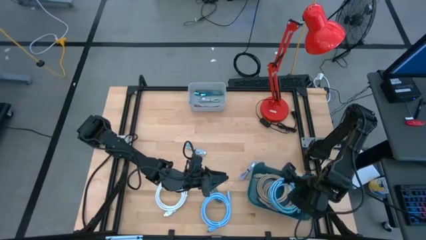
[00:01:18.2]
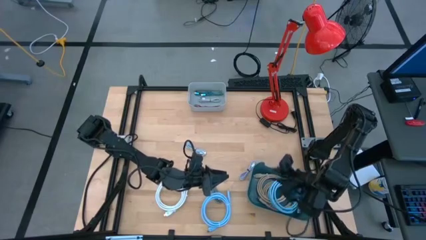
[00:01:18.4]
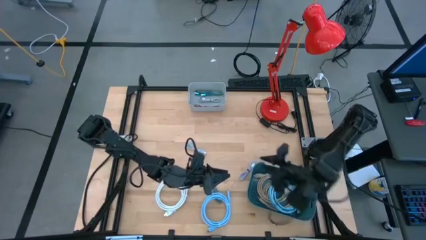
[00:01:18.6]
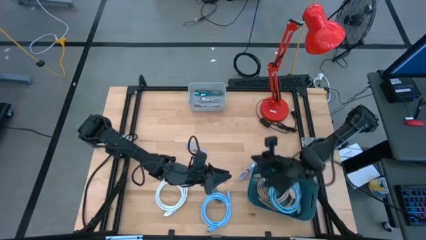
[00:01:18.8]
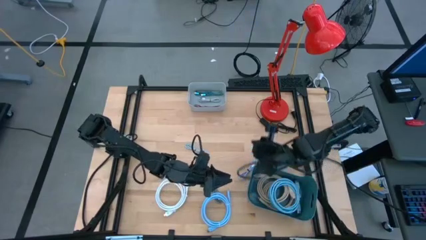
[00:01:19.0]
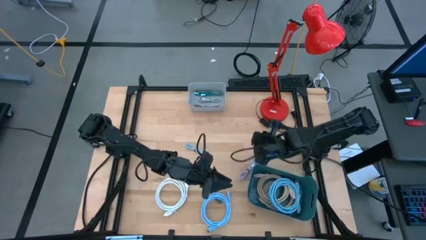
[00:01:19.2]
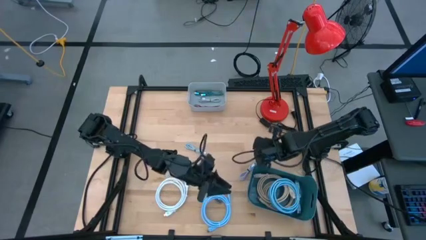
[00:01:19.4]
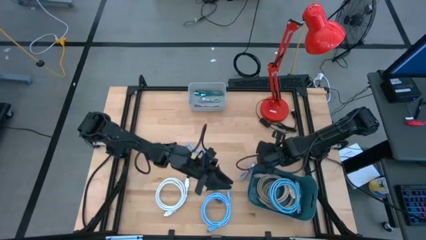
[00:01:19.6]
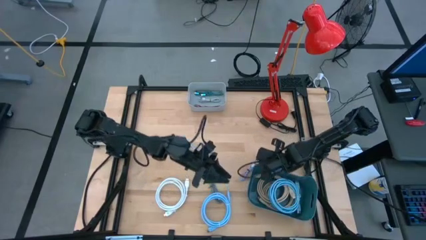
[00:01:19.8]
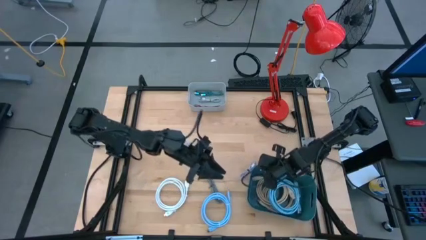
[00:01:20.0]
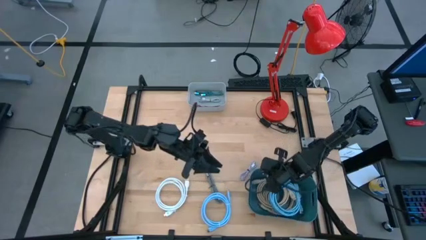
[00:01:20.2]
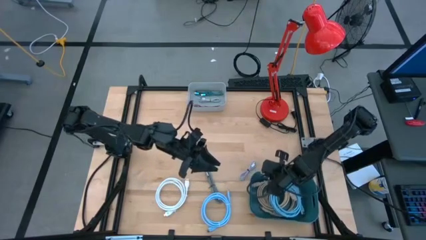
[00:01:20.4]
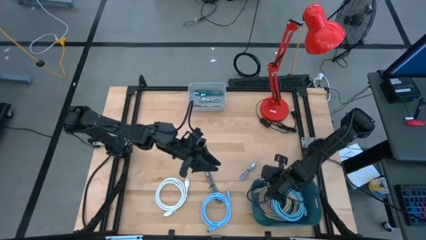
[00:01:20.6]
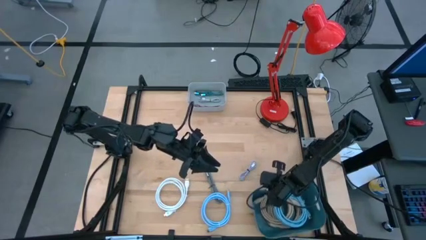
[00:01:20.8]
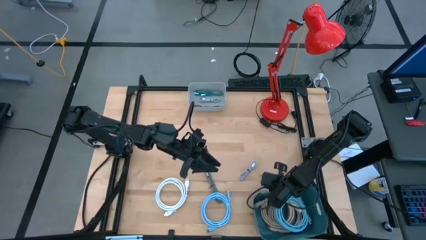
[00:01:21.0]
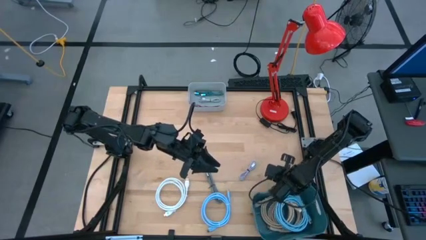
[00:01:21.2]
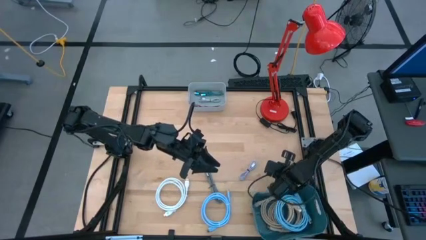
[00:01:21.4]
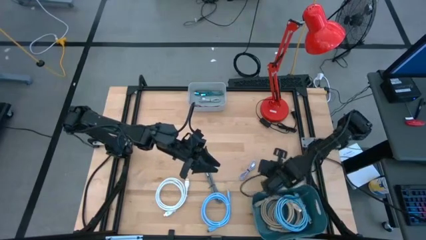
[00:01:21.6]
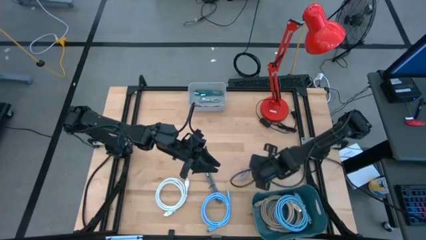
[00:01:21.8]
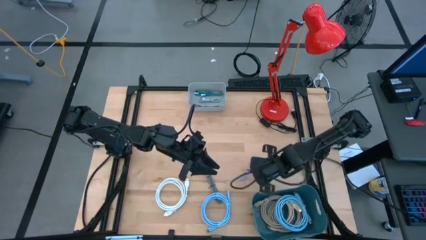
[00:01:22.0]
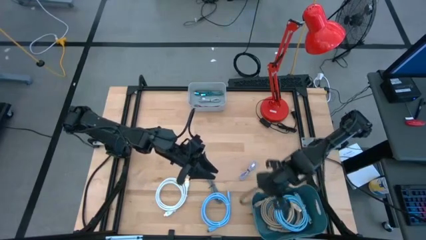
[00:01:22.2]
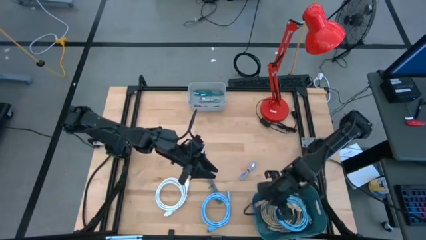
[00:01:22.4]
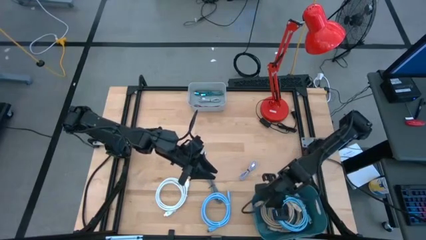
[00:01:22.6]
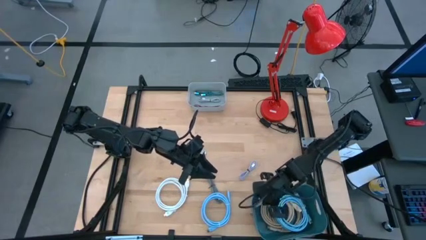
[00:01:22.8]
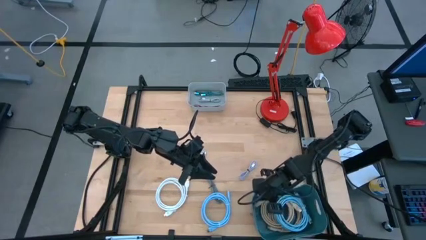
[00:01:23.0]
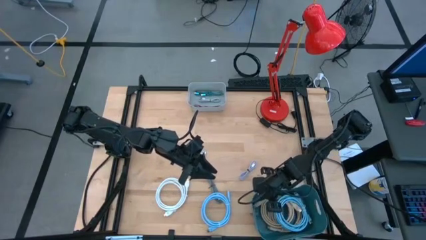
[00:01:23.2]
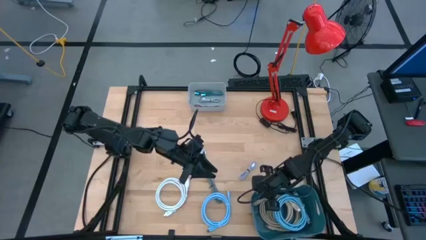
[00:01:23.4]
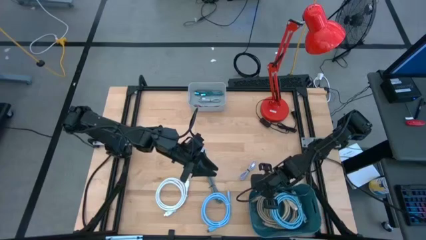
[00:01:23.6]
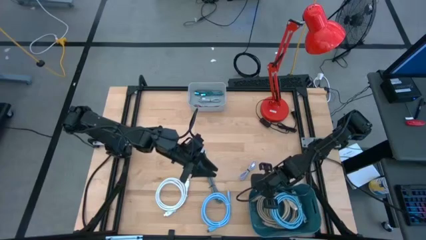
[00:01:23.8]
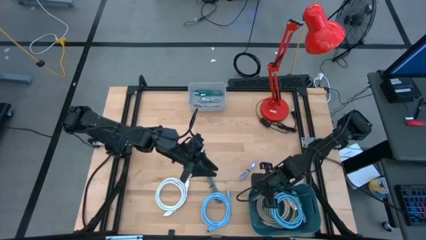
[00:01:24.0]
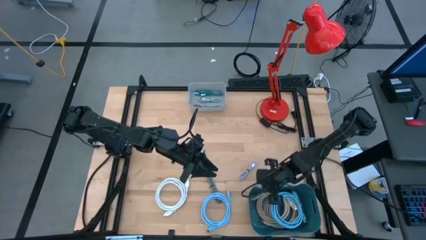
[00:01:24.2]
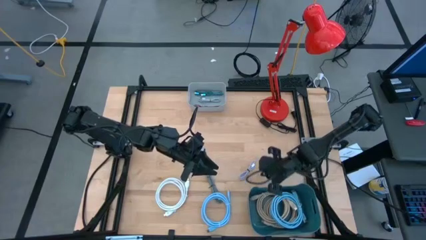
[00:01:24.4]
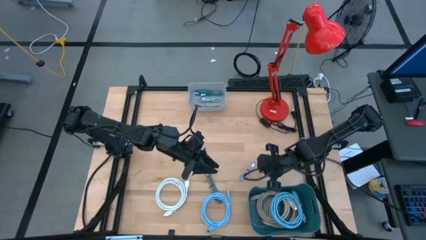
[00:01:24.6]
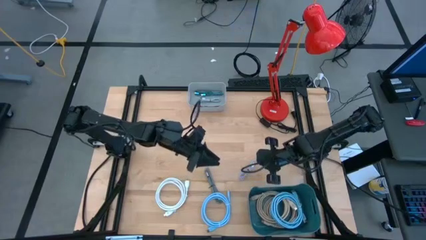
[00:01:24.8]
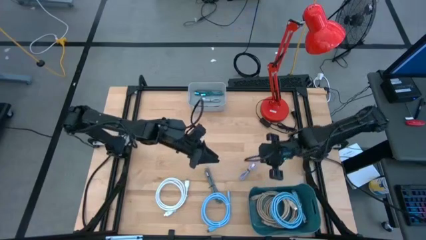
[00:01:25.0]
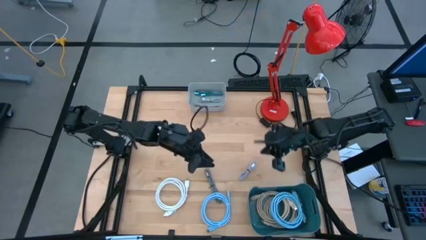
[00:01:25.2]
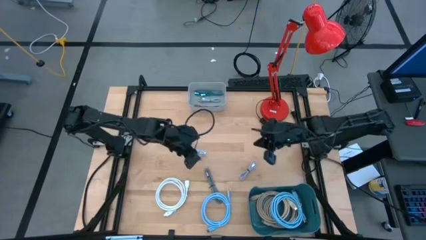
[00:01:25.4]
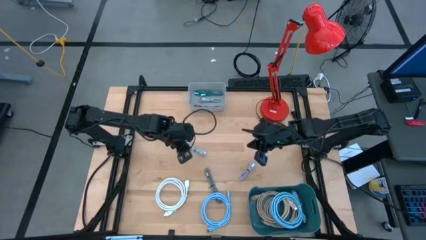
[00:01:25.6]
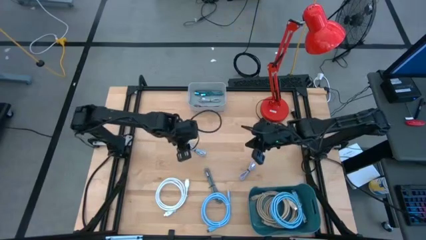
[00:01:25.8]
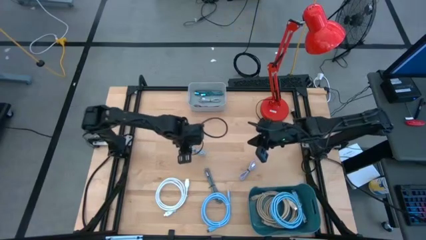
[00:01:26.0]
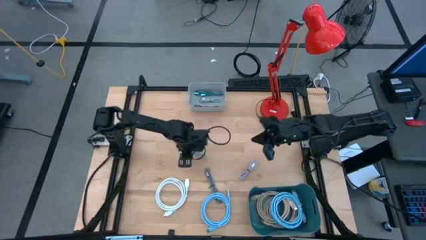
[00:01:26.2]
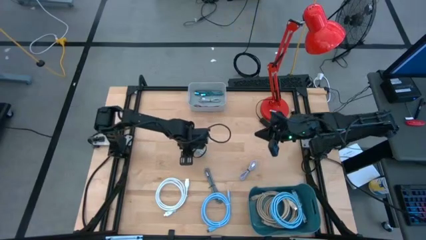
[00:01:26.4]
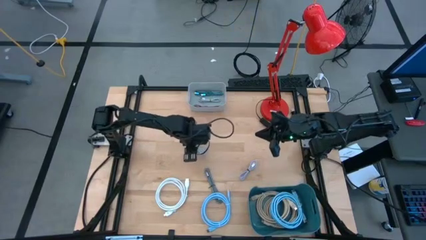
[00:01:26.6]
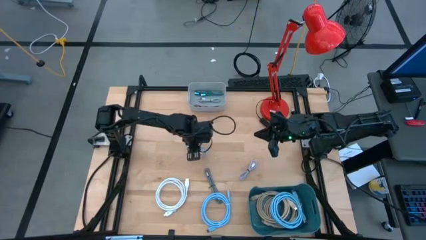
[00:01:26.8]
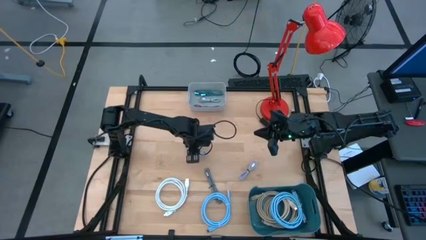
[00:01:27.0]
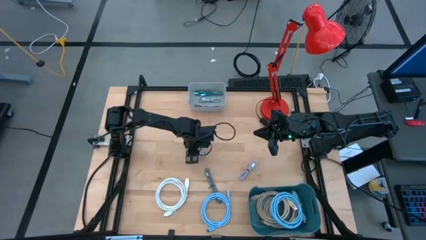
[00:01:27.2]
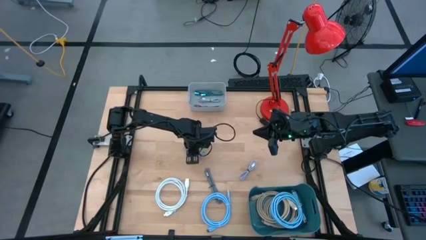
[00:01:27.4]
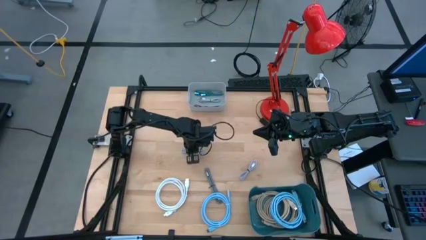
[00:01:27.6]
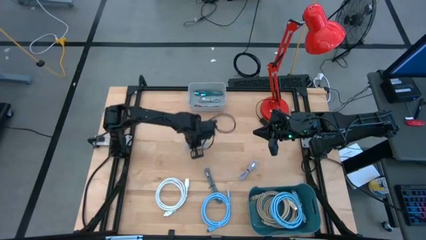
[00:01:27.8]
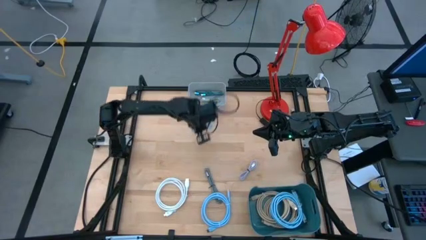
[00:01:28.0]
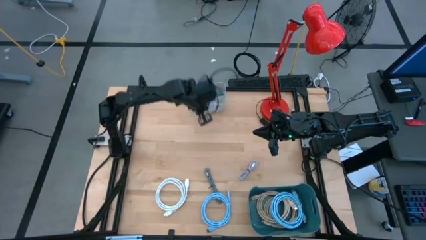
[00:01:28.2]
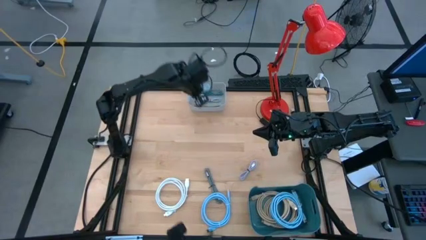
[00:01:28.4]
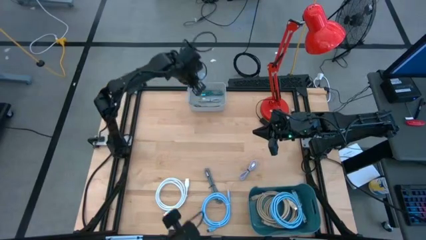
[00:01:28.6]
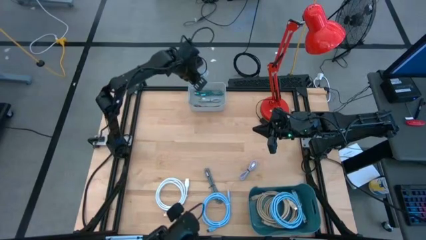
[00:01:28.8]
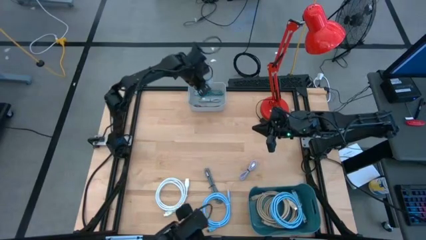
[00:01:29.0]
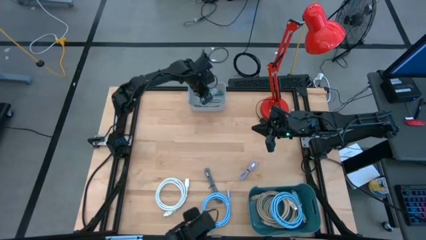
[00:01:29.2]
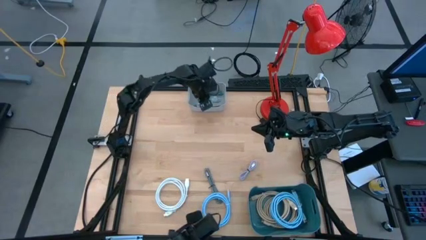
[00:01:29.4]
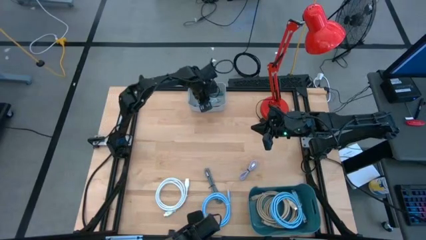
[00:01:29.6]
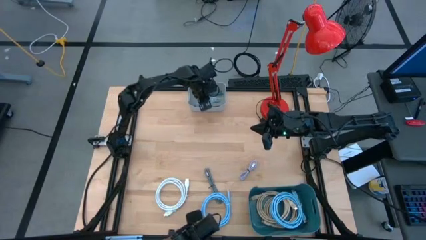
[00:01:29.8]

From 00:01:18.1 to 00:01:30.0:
Task: Pick & Place USB Port
Put the light blue usb cable into the gray bin

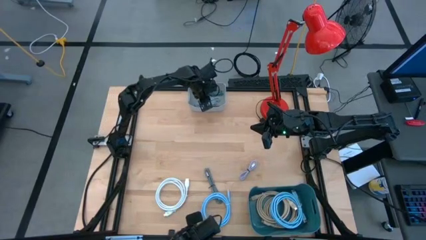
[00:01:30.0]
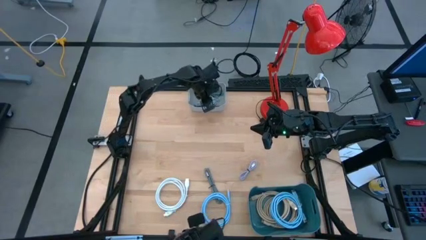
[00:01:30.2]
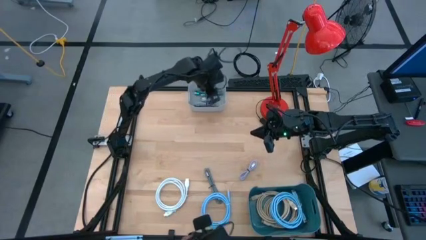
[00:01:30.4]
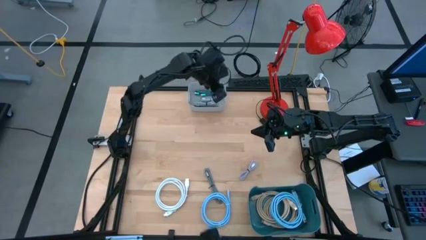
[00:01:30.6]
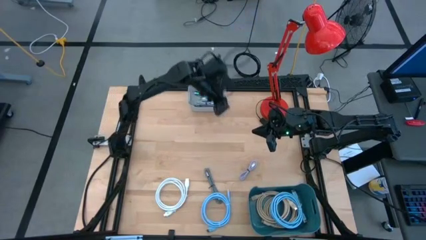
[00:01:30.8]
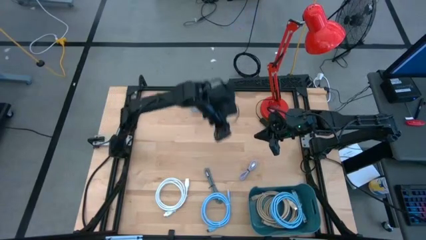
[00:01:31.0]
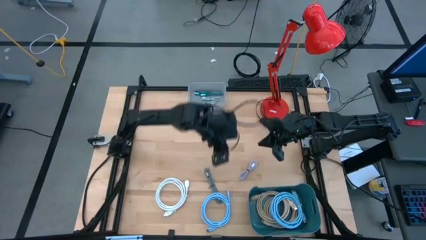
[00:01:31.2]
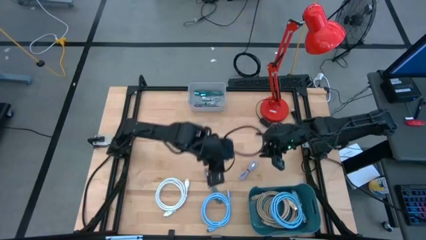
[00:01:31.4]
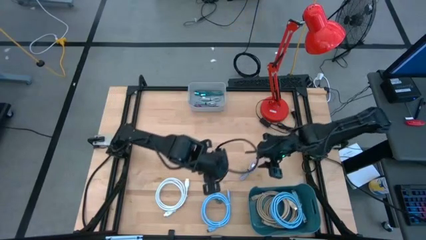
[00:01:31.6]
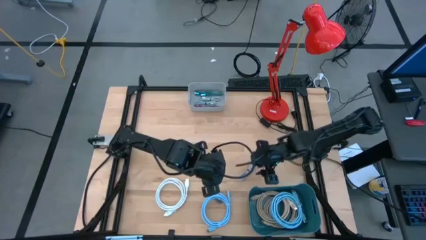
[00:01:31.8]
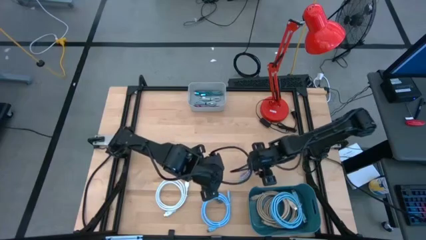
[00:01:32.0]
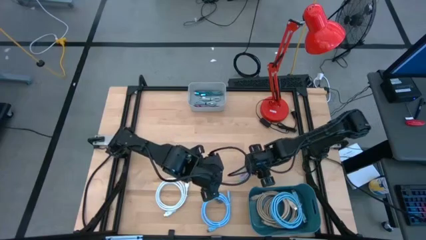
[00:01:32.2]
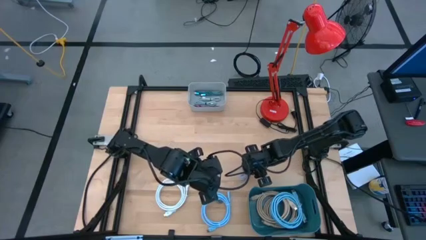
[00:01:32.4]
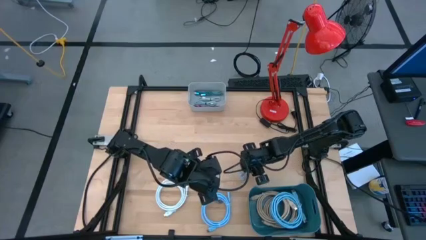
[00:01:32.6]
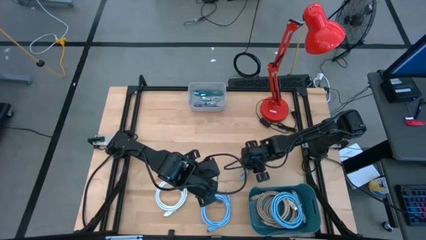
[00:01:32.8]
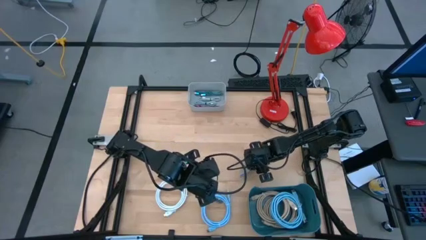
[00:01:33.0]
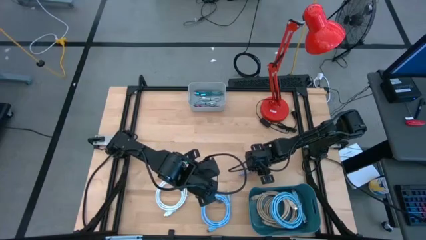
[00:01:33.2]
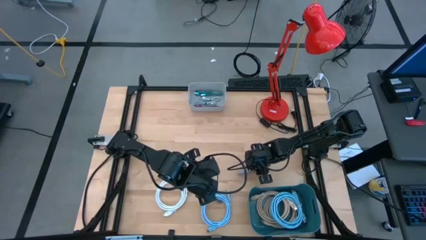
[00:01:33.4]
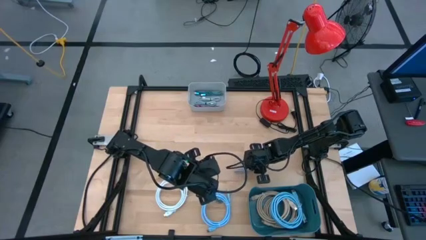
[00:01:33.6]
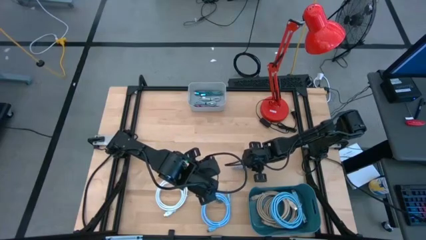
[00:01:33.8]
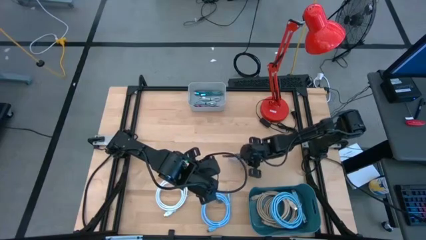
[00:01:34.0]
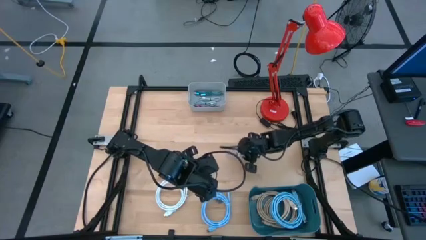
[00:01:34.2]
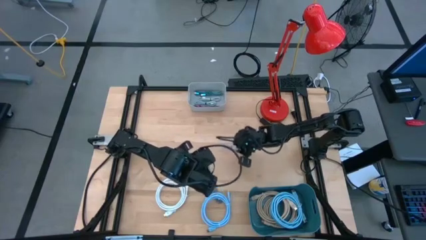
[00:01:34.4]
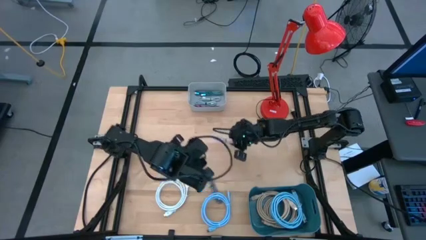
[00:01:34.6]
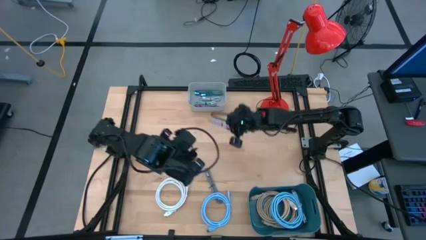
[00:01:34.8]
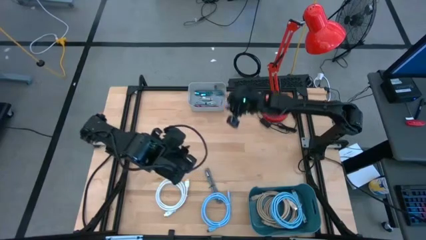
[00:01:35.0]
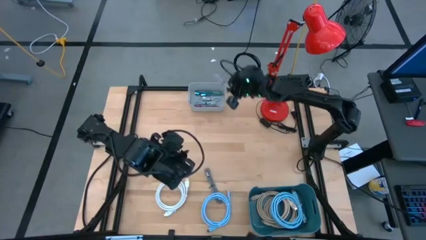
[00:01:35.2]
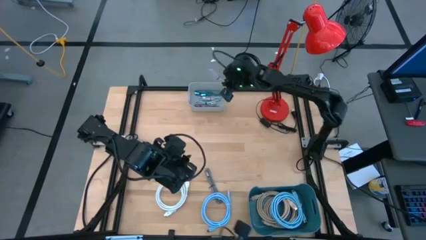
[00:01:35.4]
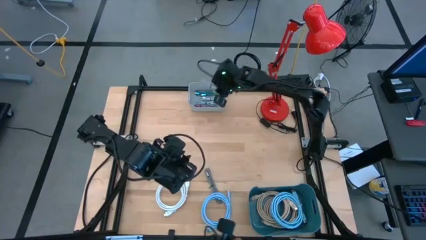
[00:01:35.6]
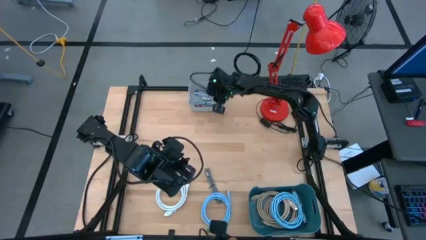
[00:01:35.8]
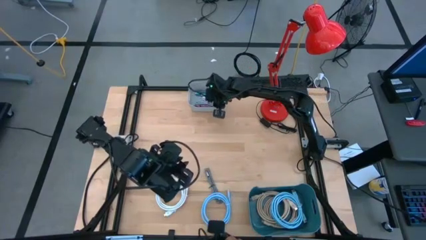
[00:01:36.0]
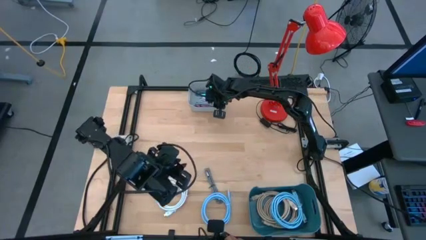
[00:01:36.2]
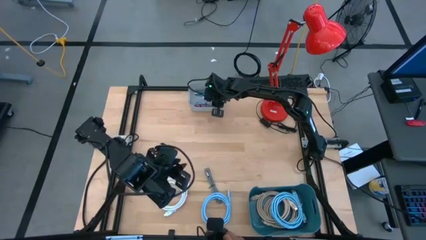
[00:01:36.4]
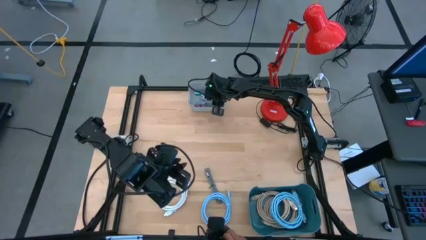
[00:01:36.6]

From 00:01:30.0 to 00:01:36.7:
Put the purple usb cable into the gray bin
